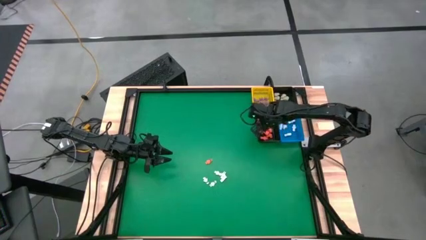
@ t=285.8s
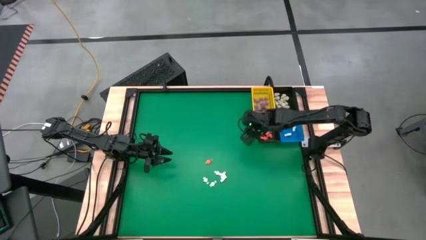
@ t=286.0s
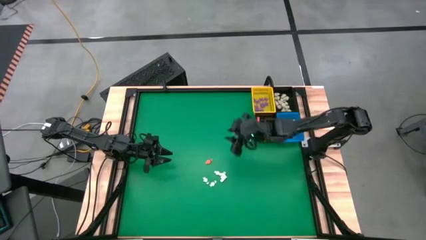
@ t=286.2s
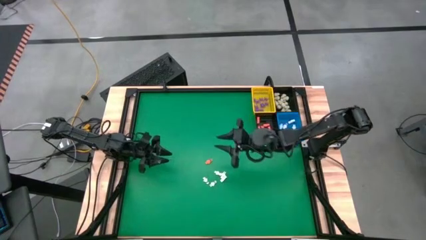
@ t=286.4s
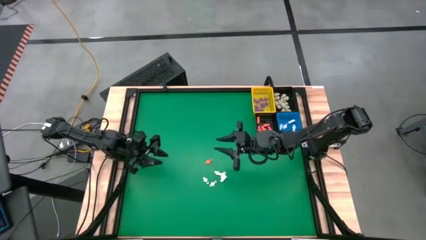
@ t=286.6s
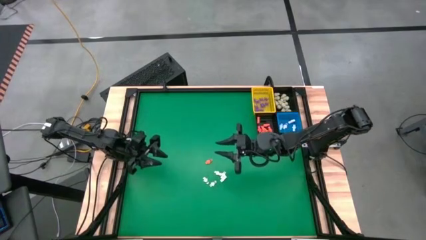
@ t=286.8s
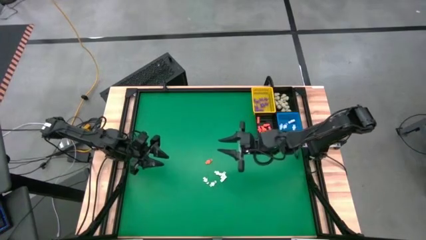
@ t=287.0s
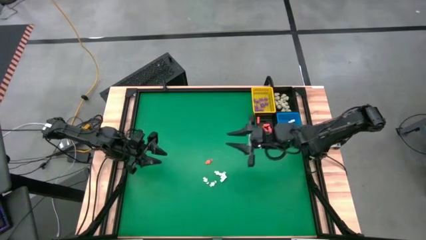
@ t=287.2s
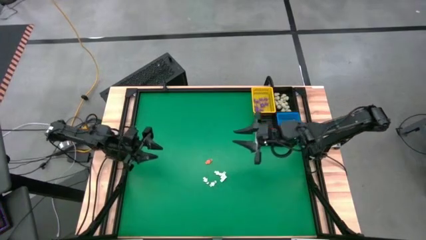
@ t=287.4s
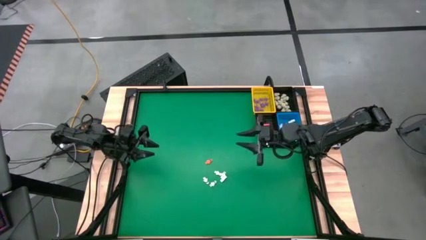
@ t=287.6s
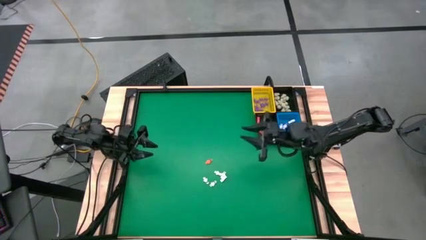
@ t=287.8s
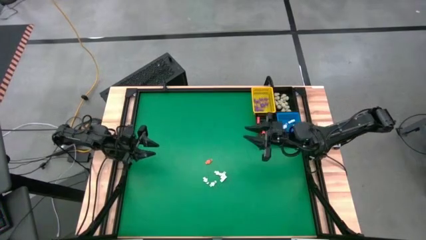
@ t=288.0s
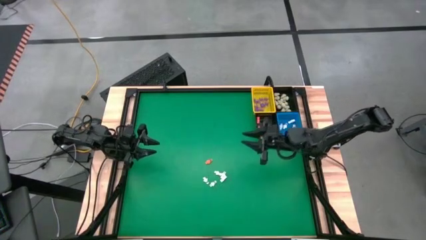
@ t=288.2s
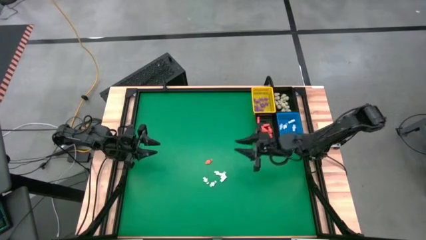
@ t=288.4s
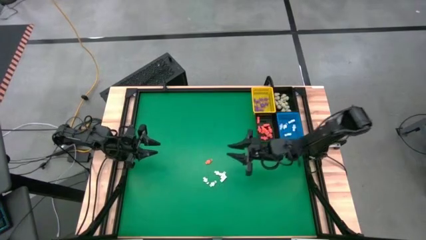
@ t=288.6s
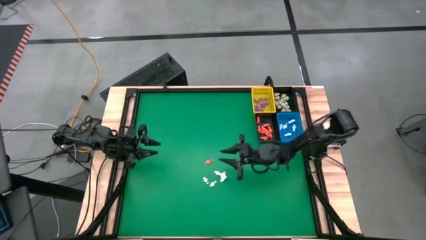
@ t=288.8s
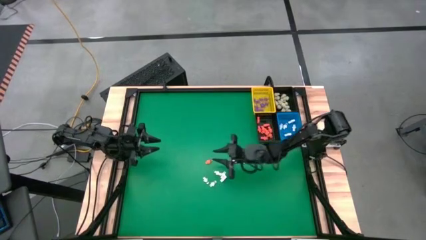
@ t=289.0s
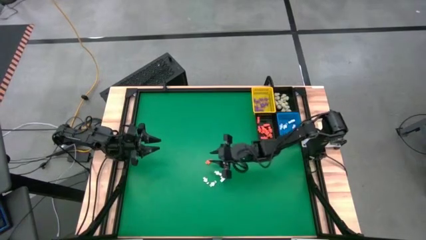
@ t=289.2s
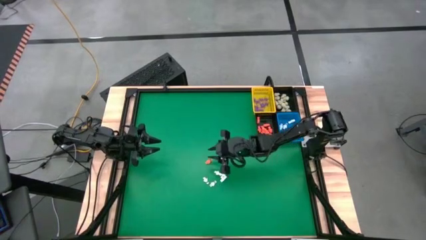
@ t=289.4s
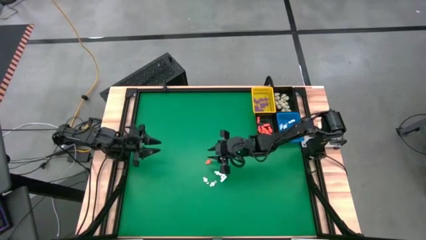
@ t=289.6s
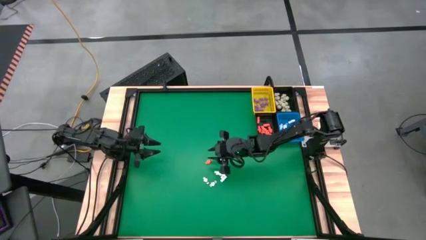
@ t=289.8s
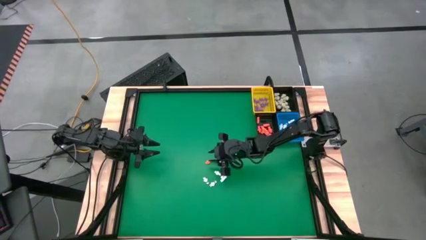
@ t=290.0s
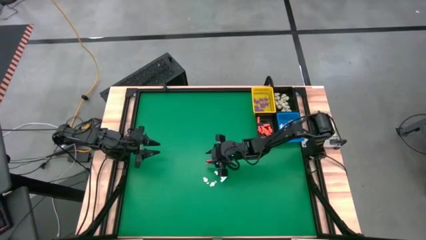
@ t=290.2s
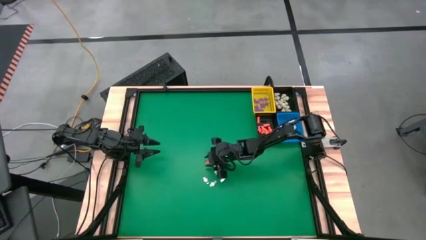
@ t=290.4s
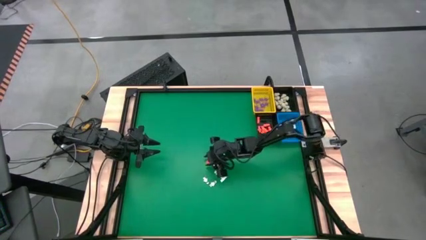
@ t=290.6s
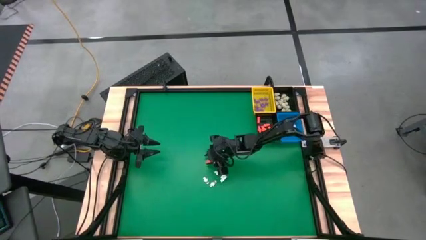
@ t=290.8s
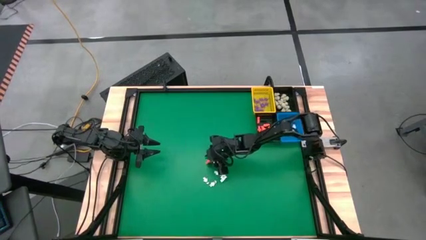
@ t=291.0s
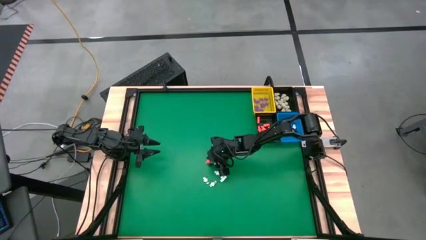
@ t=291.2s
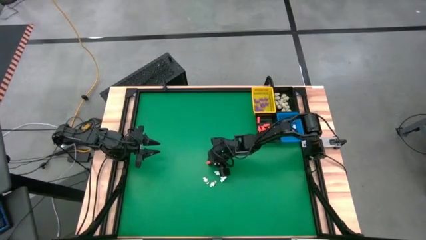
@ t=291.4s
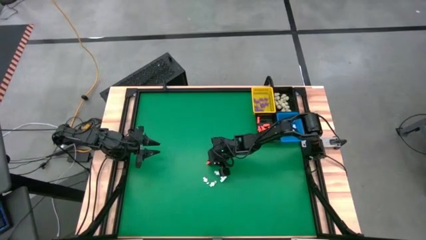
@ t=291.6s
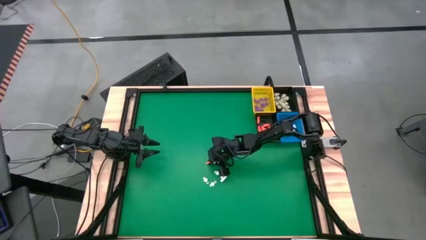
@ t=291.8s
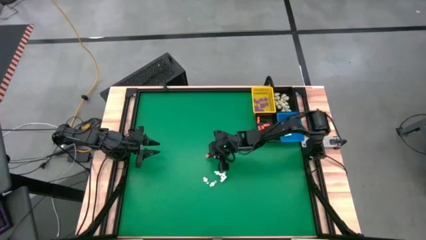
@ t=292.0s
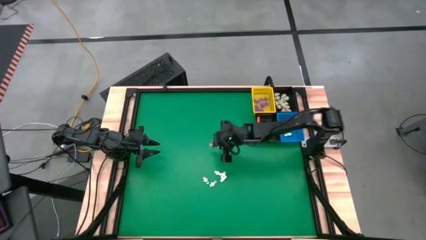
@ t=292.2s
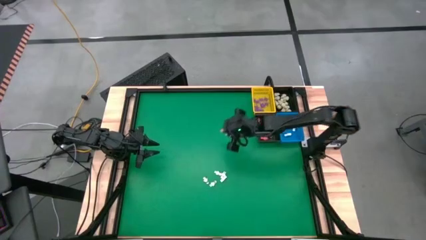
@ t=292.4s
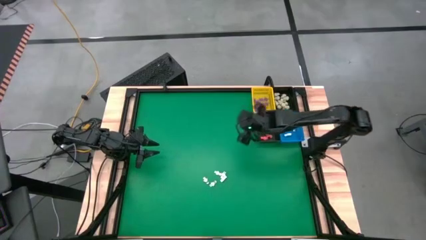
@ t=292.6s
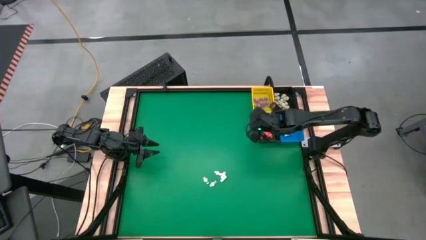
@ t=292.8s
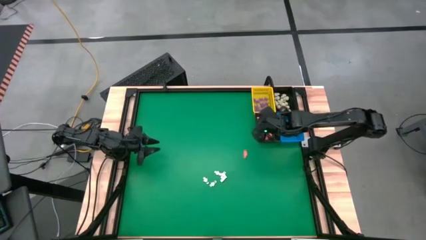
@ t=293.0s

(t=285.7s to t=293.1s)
Task: Sort Halloween decoration
Put the orange skeleton toy into the bottom black basket

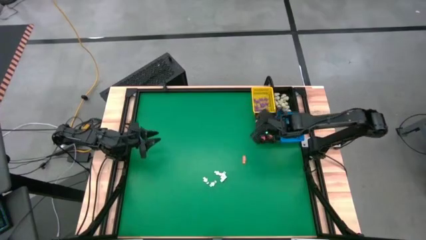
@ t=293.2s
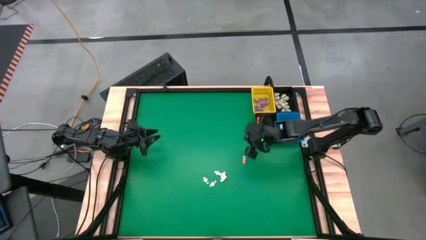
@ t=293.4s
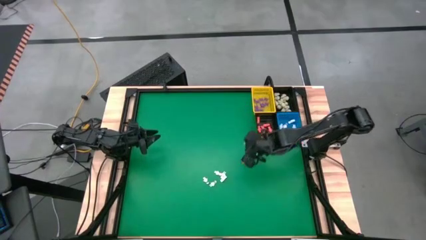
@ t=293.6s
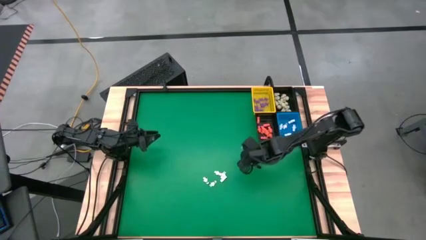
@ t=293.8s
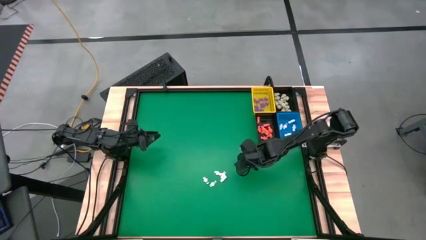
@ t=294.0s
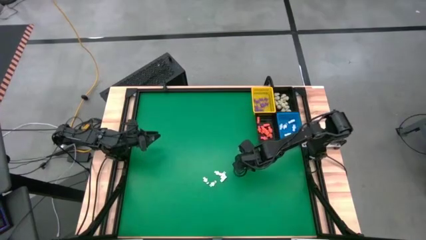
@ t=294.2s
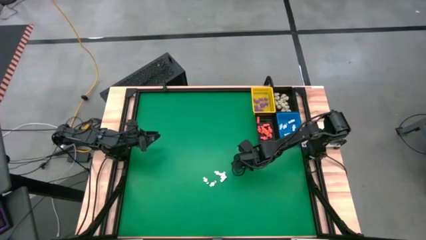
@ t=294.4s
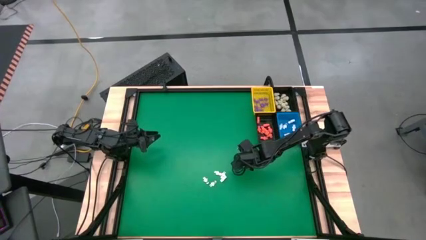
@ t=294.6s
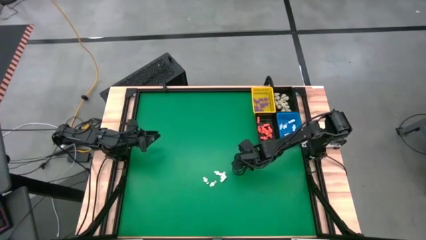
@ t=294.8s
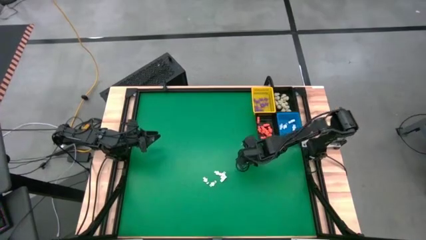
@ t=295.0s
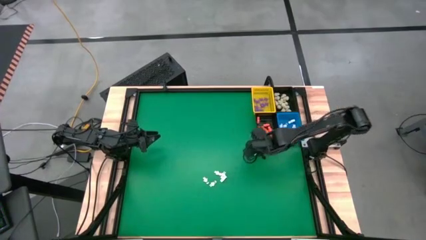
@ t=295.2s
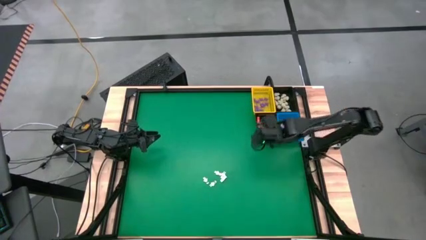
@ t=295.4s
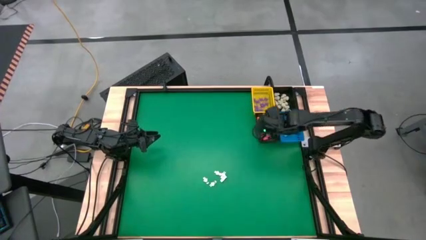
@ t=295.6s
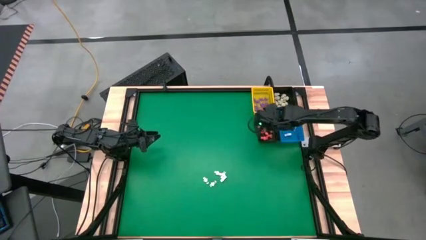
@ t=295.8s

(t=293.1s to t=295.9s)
Put the orange skeleton toy into the bottom black basket

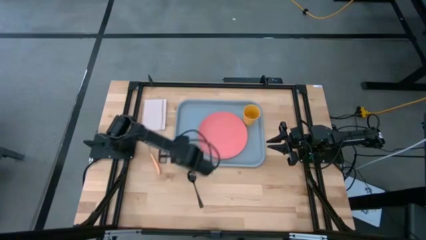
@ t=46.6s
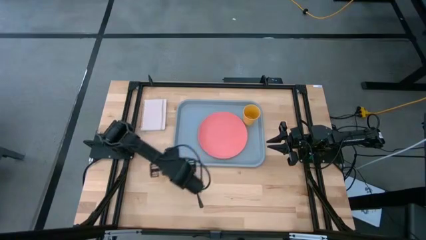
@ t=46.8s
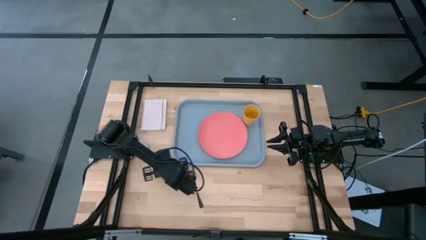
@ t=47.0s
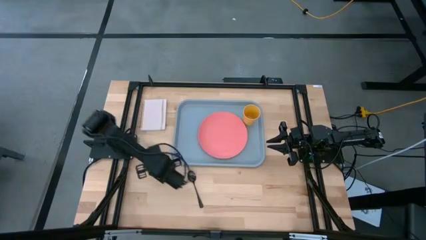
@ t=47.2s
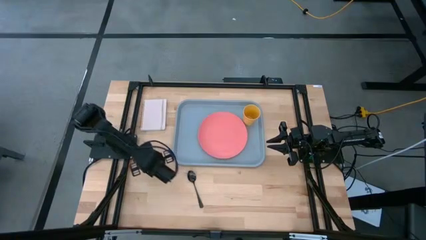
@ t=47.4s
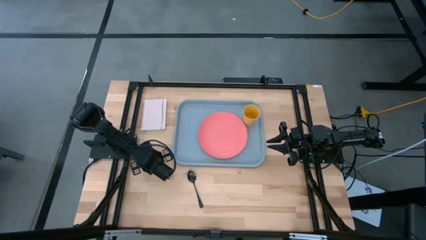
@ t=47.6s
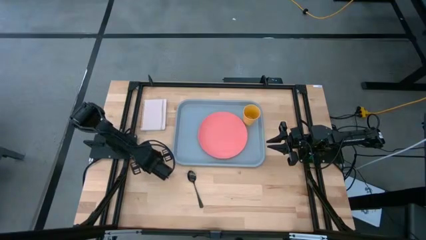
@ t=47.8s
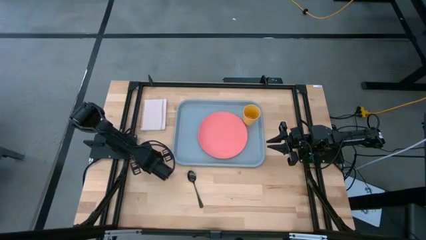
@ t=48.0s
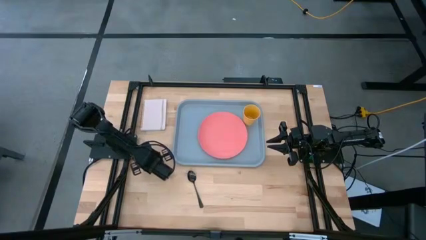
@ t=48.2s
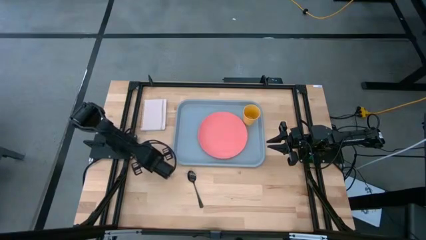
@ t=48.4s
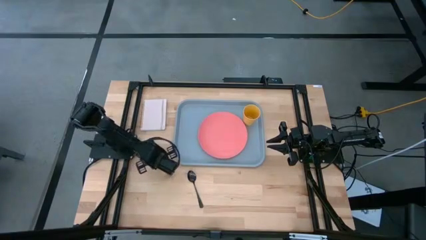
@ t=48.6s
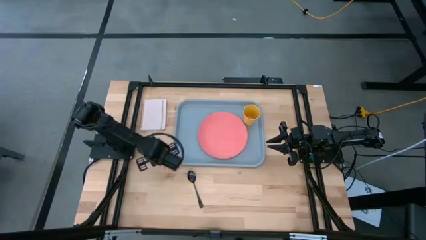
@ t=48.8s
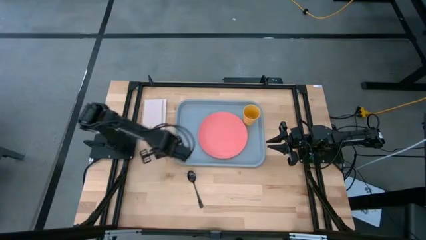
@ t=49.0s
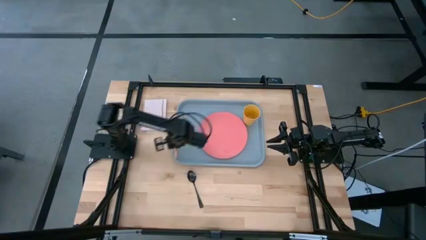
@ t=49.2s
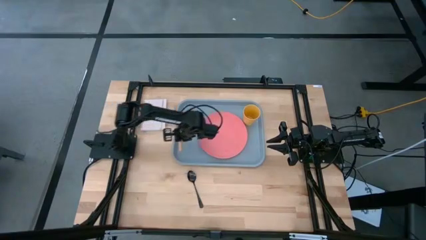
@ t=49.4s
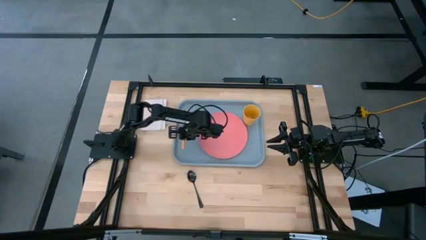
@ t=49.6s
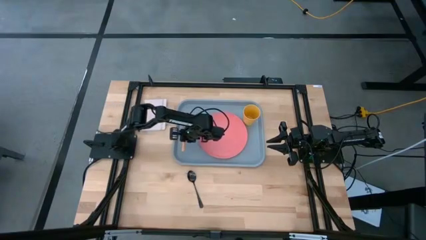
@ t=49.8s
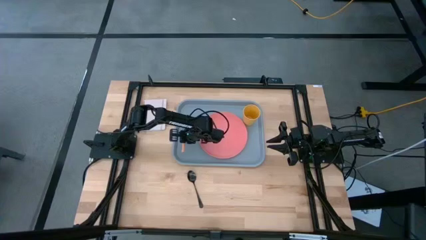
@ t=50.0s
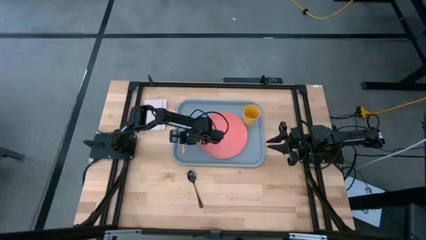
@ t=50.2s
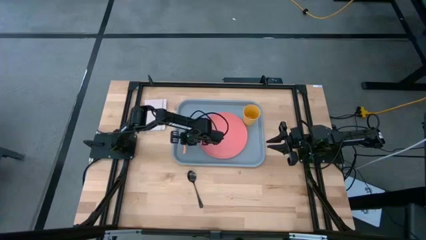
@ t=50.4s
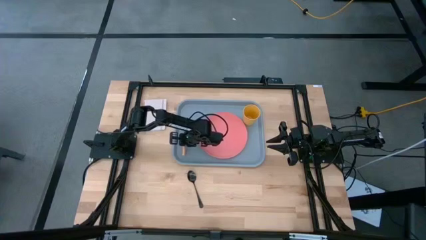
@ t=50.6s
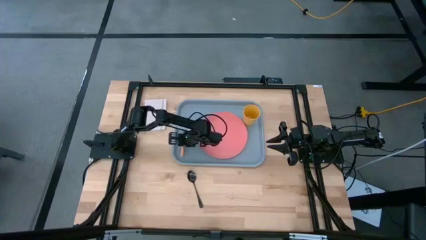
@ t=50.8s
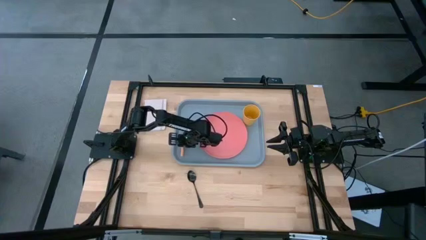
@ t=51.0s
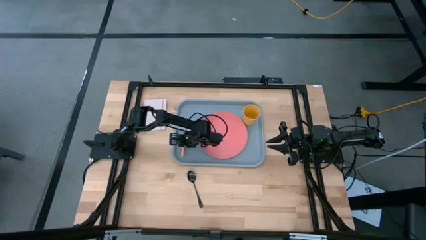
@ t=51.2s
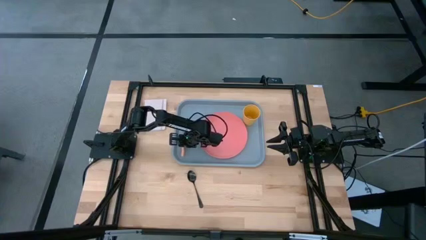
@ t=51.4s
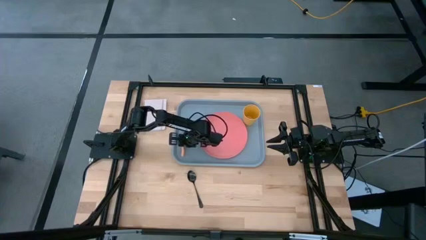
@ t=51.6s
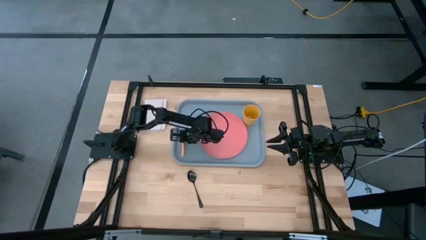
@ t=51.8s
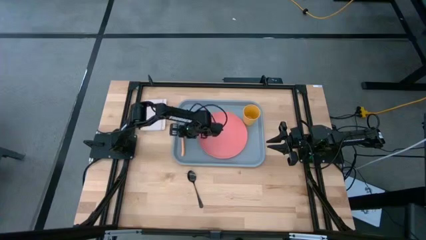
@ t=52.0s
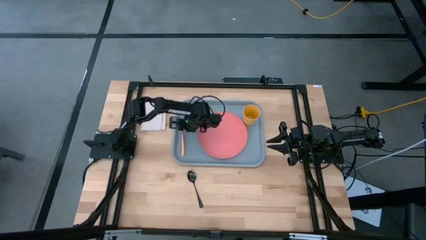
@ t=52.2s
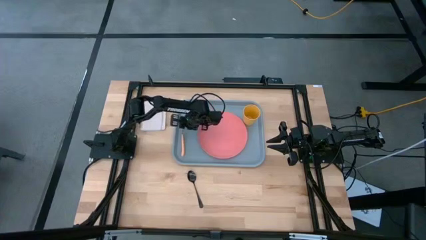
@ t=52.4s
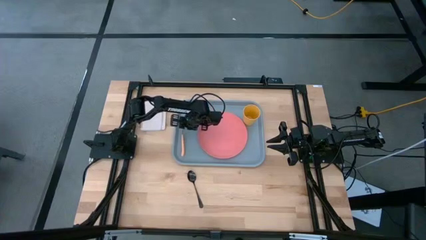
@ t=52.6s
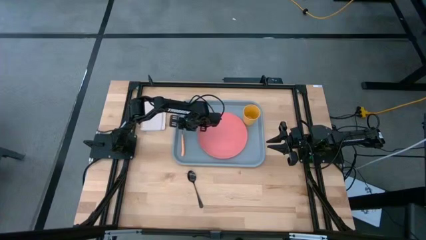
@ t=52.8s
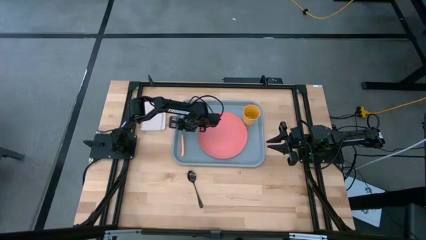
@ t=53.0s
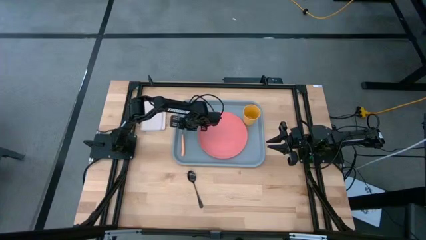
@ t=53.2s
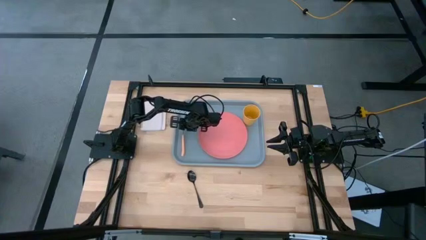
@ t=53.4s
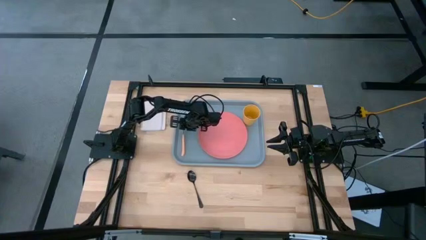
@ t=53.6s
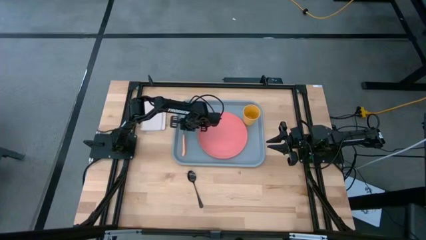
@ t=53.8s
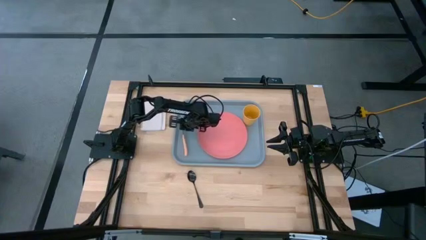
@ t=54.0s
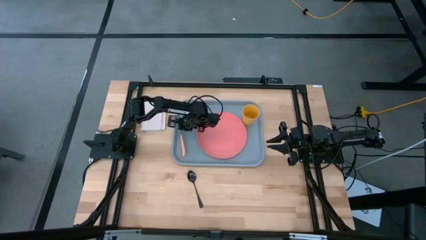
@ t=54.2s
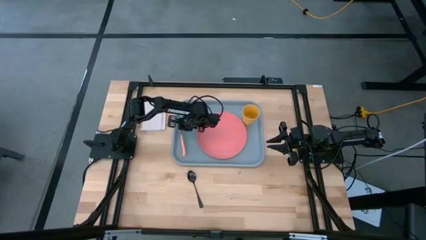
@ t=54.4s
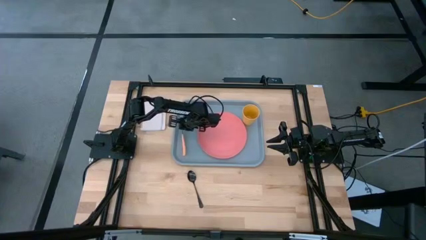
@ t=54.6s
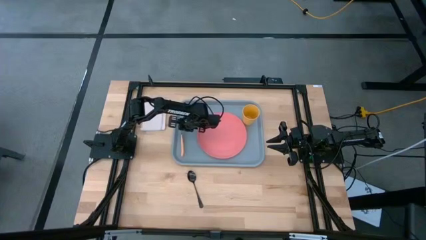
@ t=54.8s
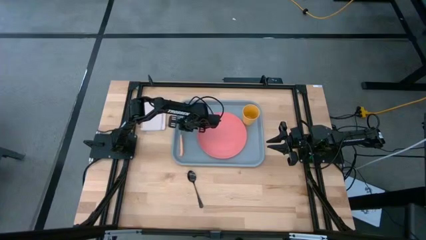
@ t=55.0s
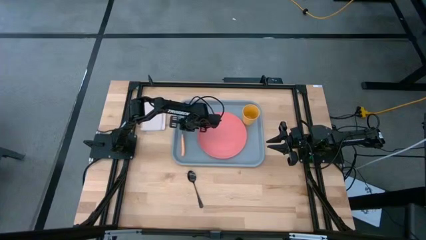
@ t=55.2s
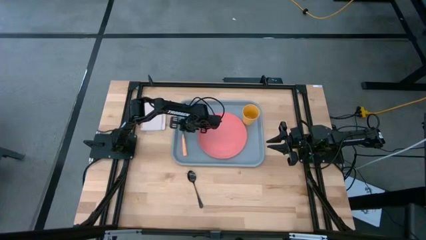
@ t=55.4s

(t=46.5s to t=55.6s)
Task: Pick and place plate/cup/fork/spoon on tray
Put the fork on the serving tray
